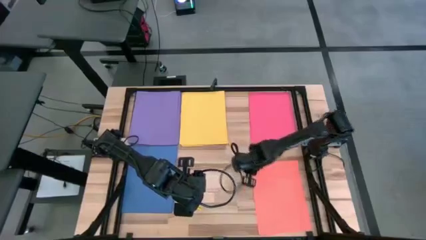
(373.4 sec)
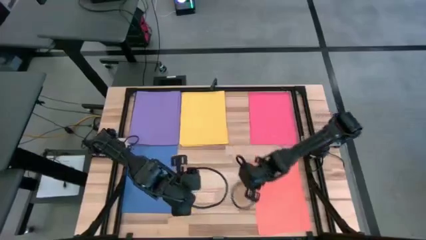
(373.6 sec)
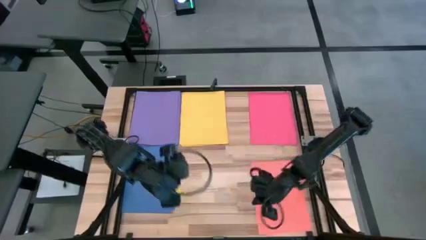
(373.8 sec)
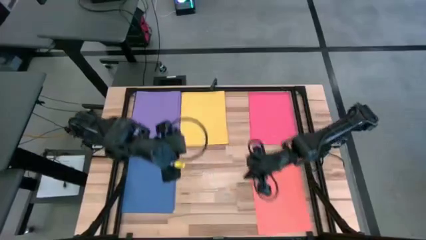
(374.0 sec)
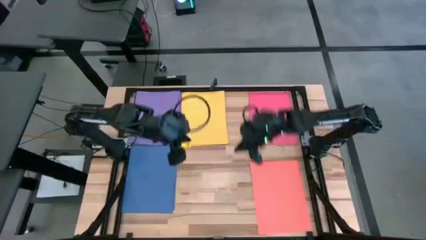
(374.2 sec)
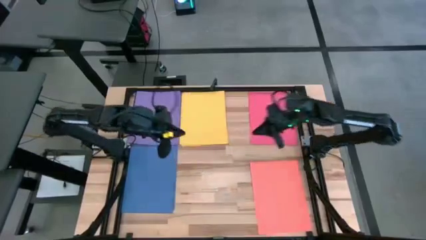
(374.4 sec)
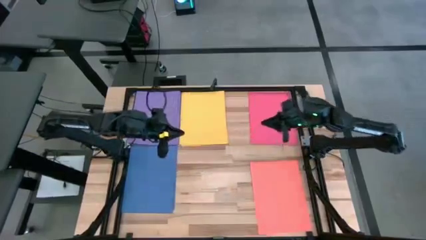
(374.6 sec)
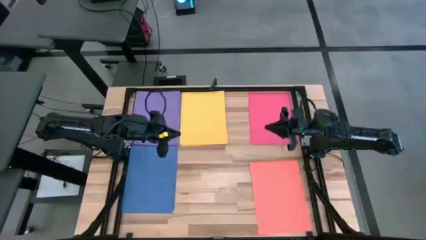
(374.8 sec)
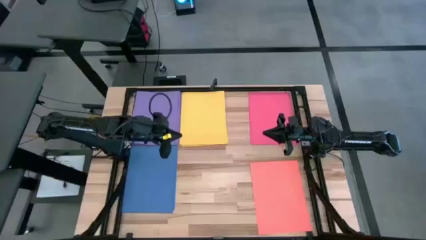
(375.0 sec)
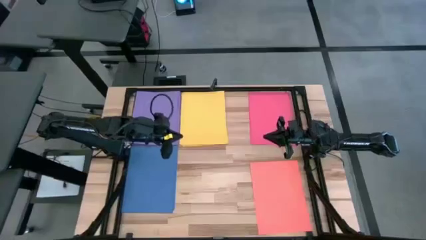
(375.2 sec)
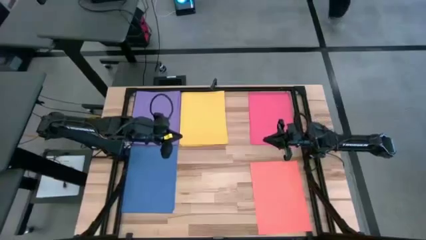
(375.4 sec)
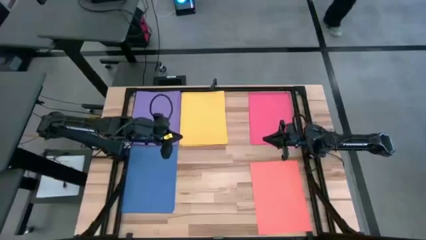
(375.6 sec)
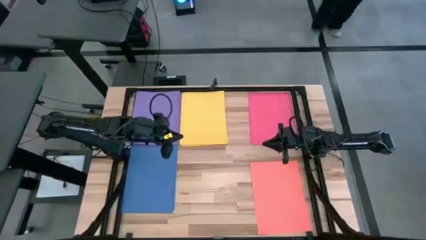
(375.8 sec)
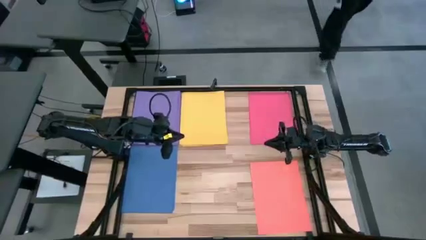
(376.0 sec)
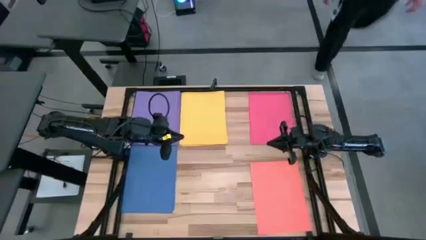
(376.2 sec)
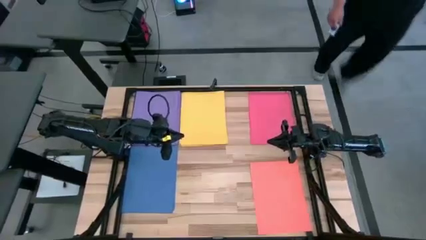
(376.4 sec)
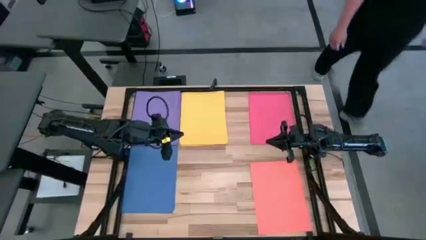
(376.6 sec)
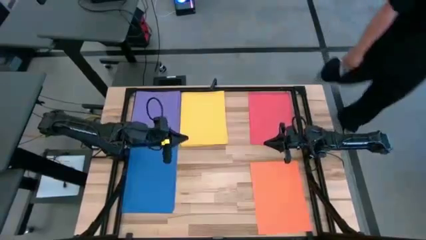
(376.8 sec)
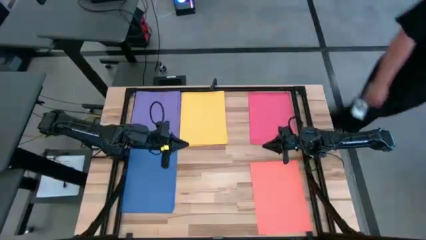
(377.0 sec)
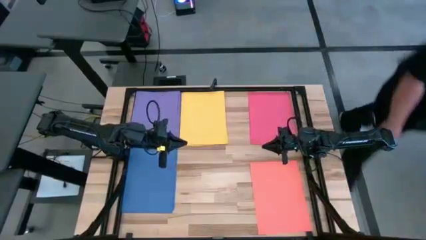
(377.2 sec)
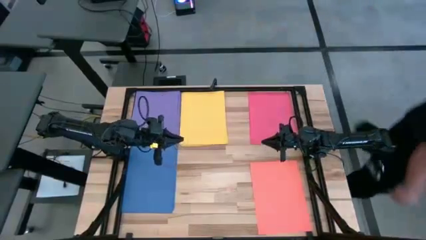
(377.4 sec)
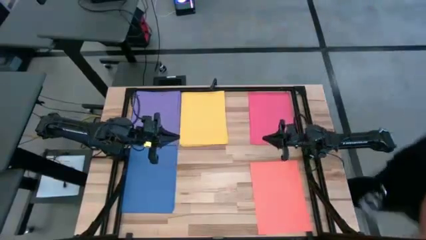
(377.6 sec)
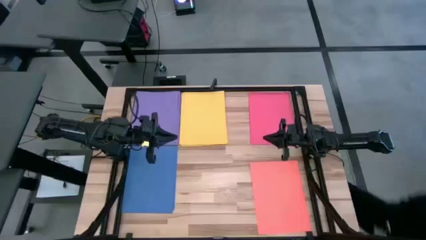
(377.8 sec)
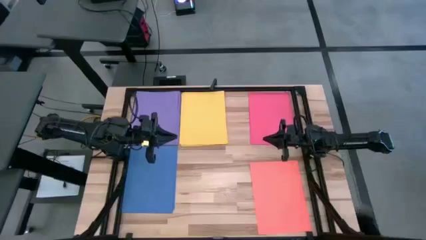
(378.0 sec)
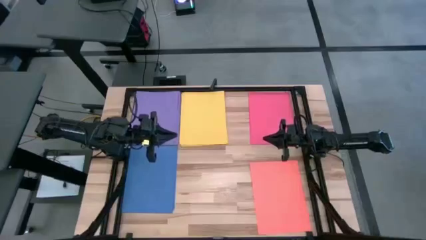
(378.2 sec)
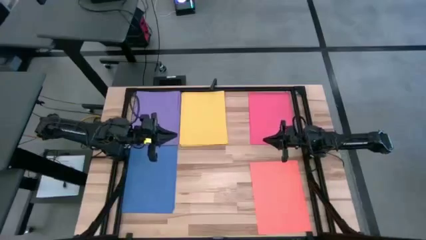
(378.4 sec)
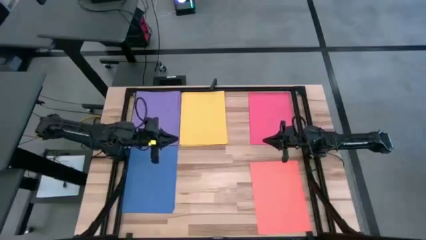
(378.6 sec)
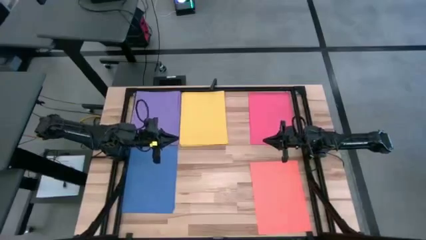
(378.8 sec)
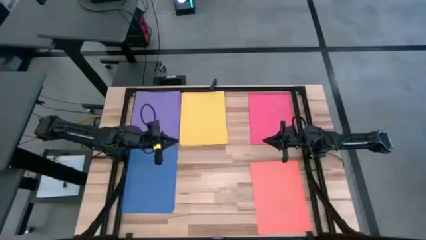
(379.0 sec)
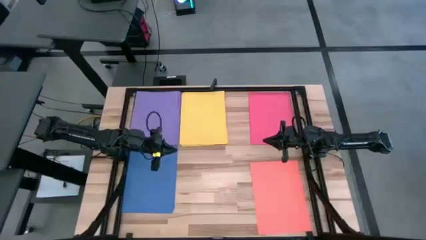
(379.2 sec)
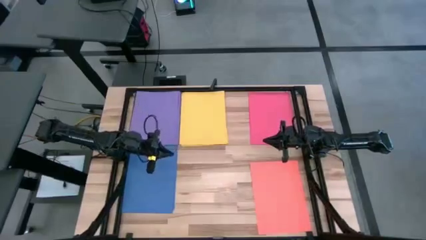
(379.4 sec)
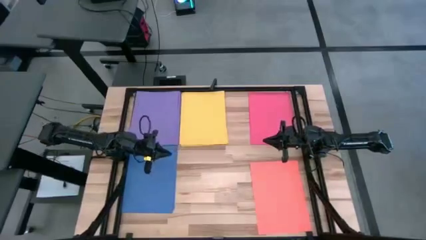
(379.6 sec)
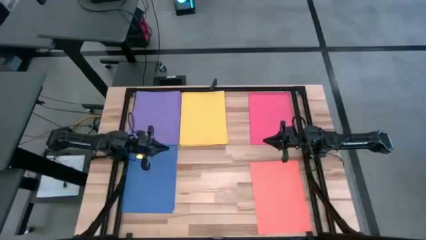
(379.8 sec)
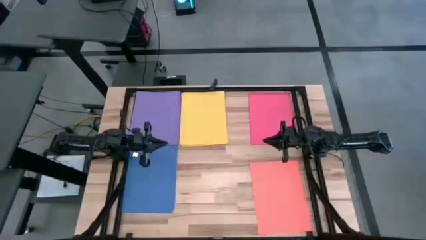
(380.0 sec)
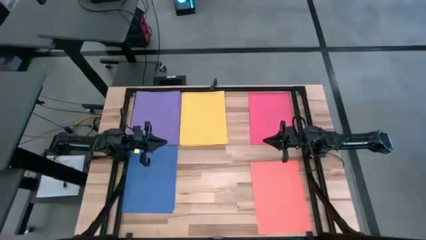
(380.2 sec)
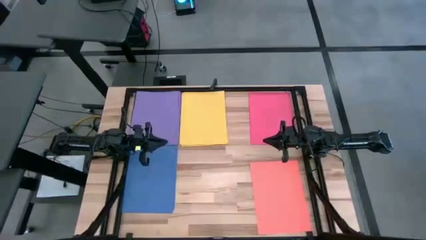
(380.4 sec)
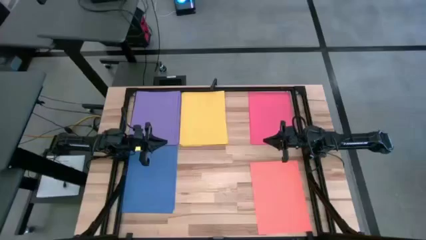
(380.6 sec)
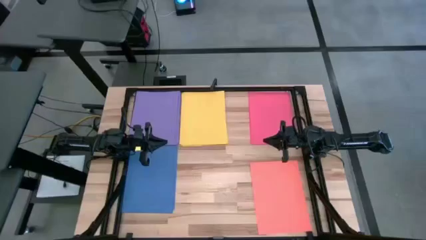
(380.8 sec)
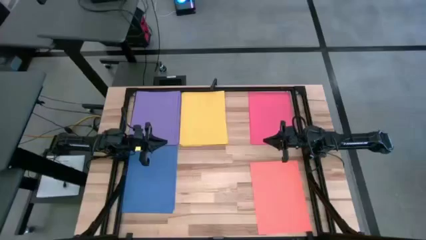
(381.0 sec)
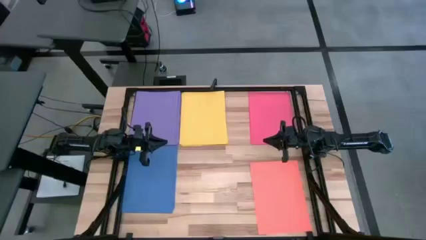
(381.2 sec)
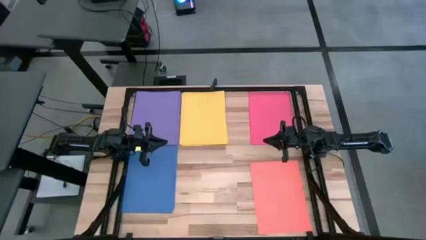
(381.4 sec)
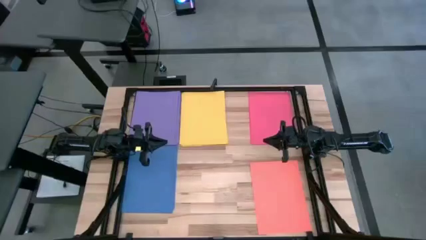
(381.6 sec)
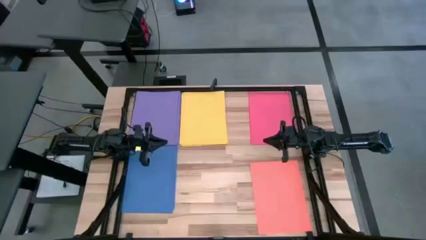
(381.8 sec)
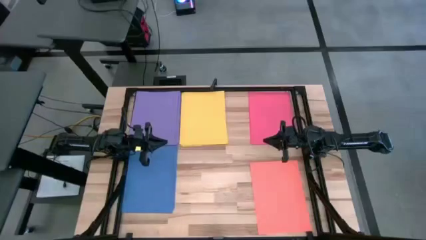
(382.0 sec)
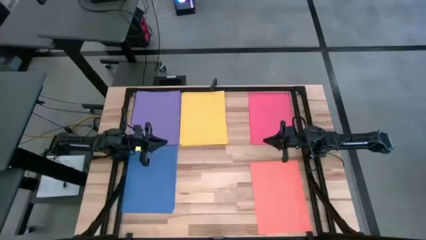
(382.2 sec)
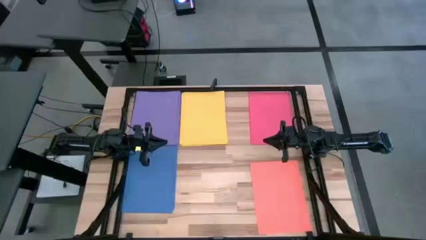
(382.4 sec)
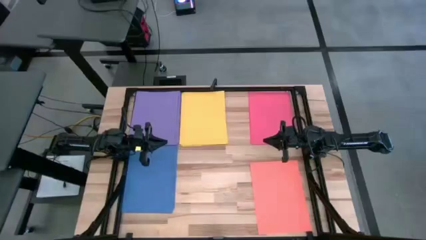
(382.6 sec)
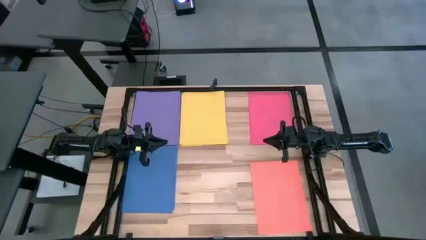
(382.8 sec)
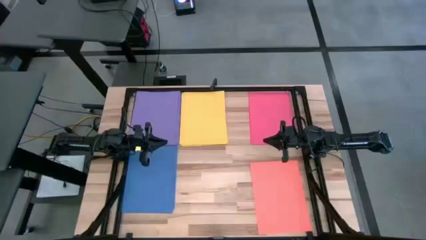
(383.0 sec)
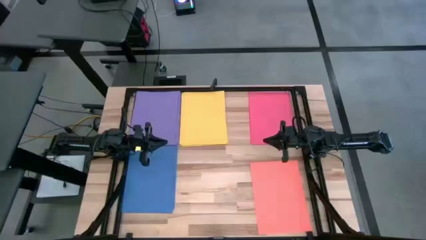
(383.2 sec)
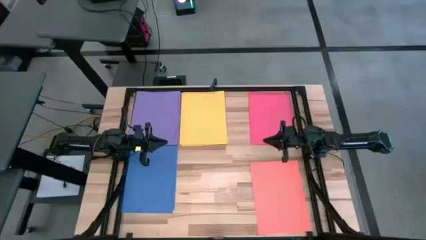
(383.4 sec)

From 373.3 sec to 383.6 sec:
Task: Organize paper
Return to Home Position

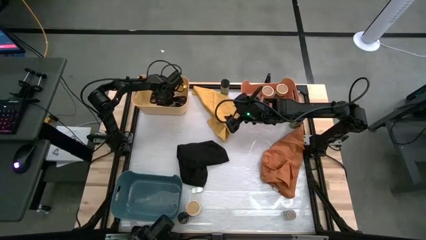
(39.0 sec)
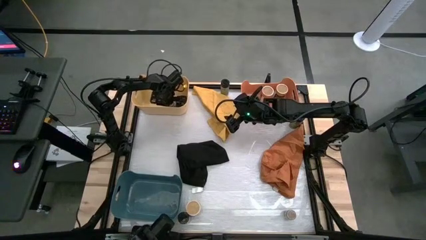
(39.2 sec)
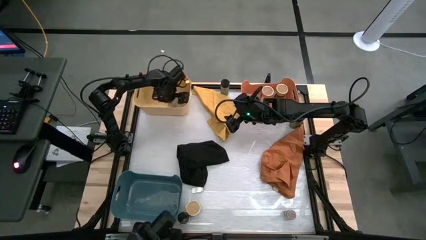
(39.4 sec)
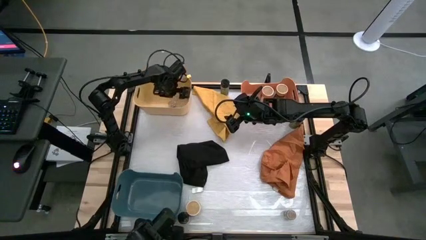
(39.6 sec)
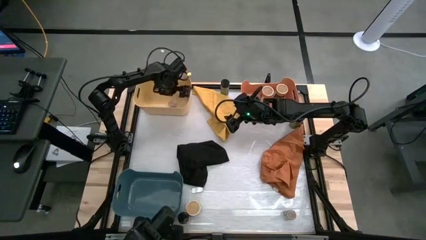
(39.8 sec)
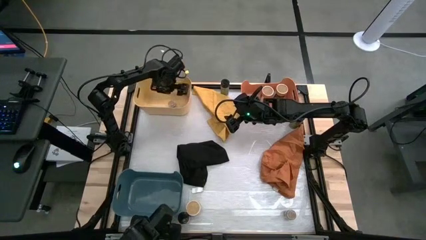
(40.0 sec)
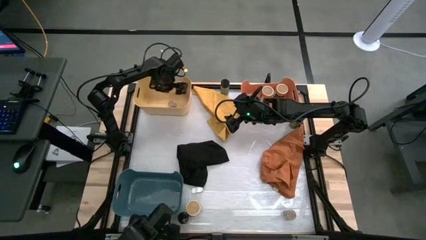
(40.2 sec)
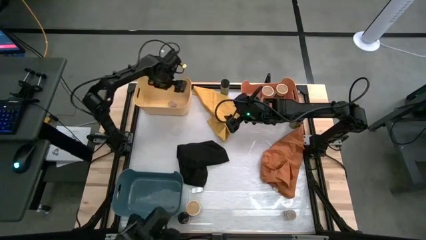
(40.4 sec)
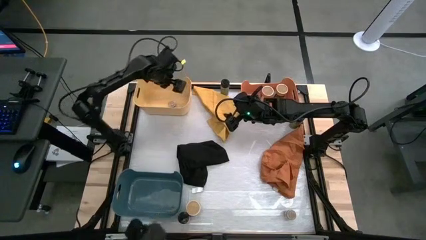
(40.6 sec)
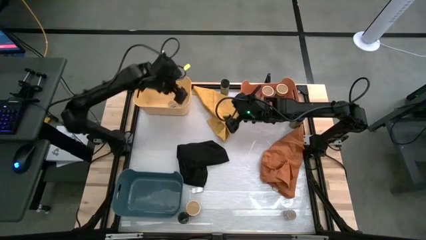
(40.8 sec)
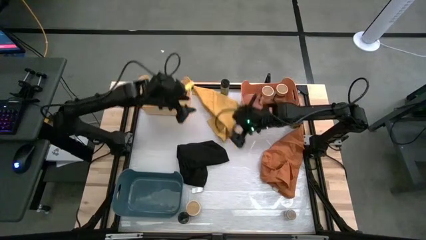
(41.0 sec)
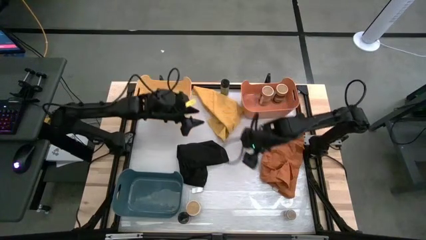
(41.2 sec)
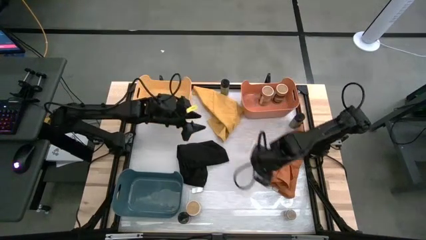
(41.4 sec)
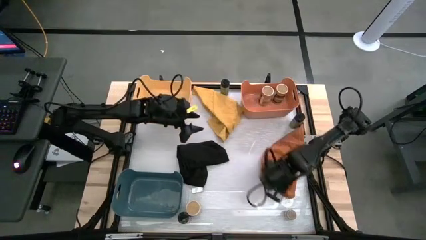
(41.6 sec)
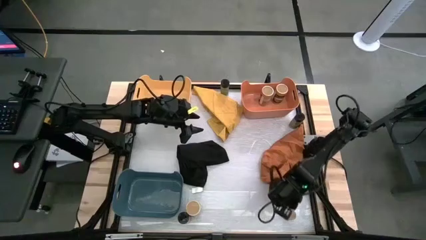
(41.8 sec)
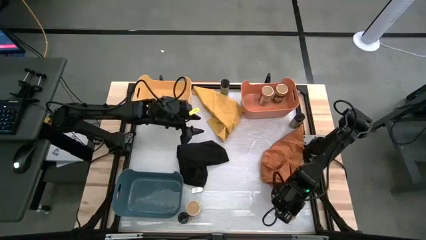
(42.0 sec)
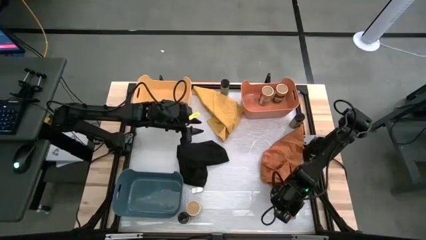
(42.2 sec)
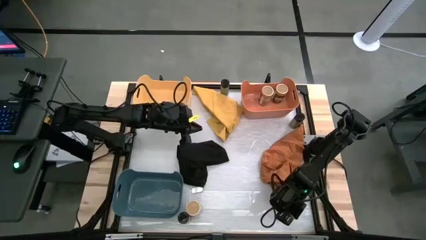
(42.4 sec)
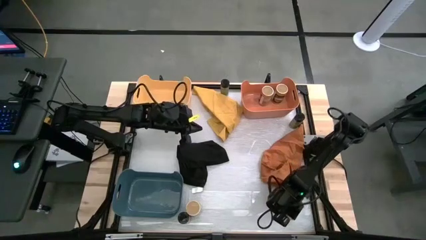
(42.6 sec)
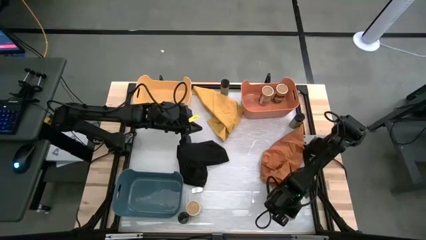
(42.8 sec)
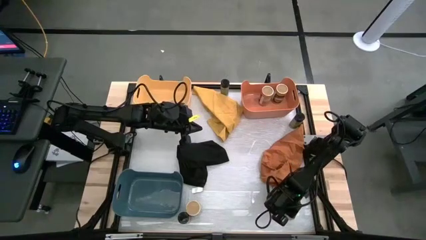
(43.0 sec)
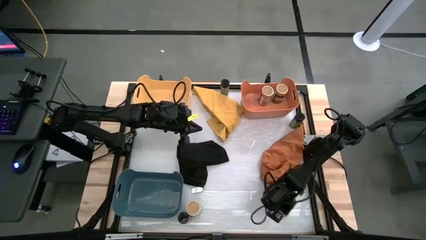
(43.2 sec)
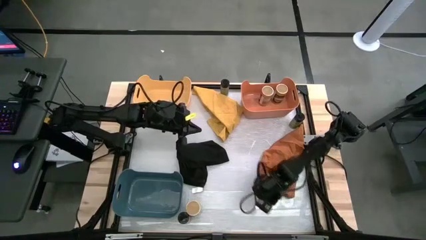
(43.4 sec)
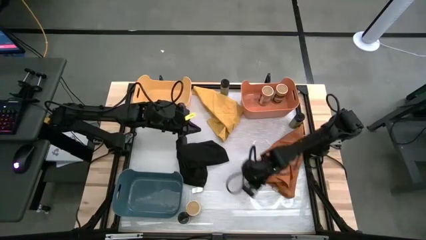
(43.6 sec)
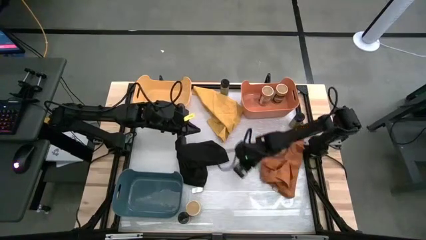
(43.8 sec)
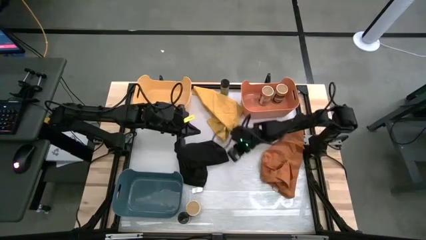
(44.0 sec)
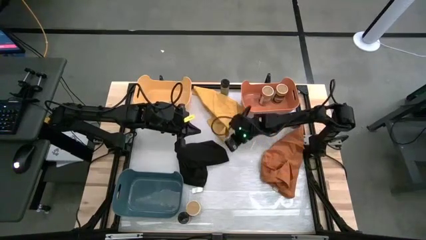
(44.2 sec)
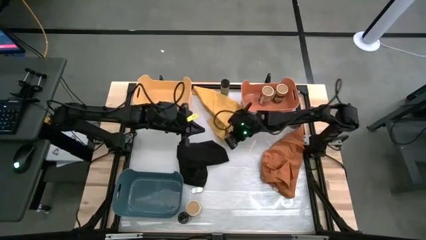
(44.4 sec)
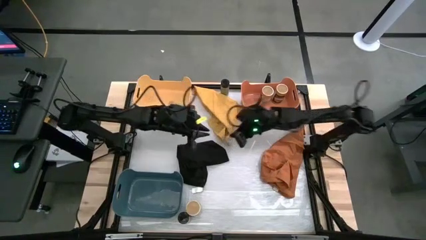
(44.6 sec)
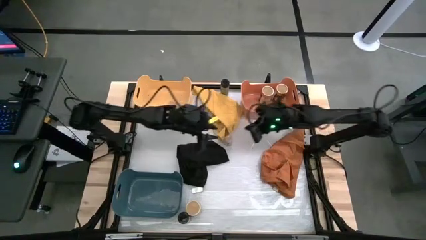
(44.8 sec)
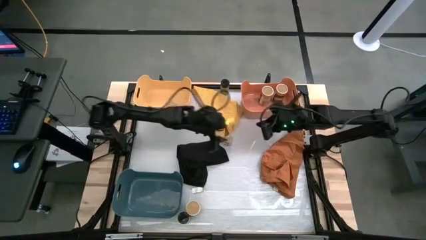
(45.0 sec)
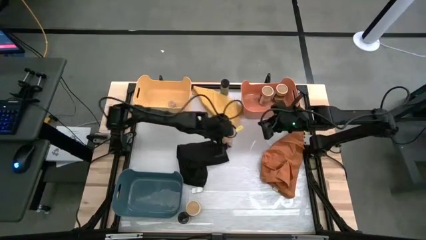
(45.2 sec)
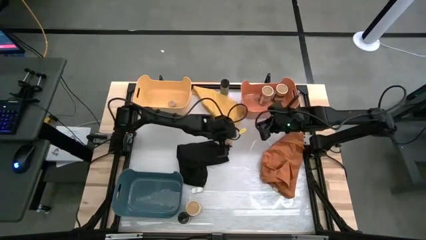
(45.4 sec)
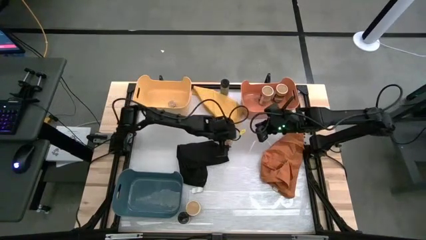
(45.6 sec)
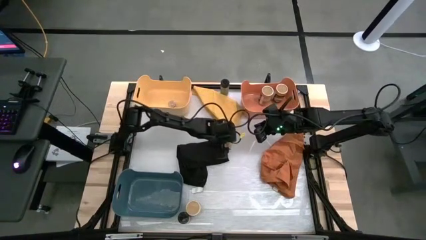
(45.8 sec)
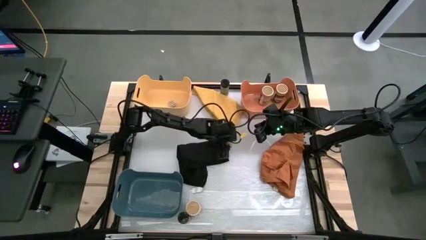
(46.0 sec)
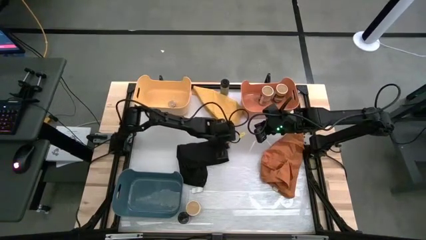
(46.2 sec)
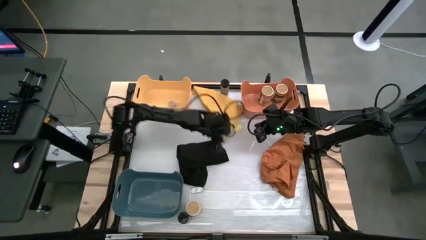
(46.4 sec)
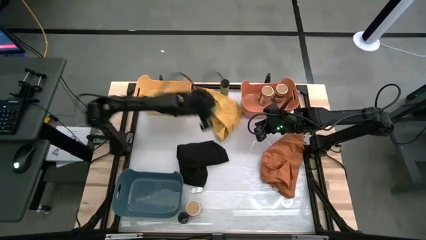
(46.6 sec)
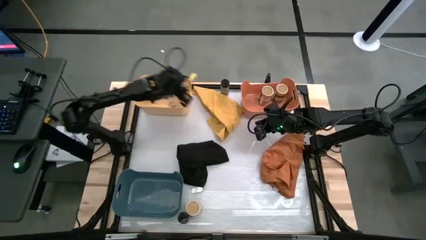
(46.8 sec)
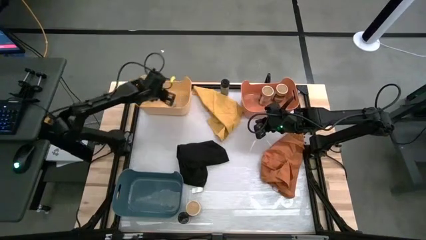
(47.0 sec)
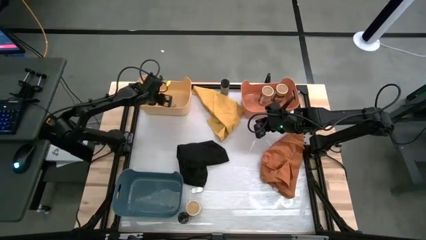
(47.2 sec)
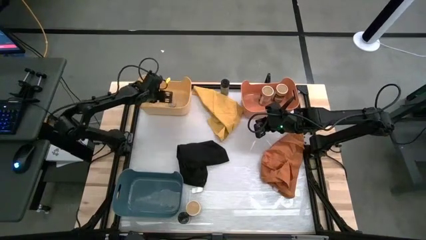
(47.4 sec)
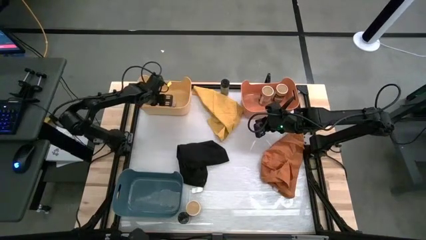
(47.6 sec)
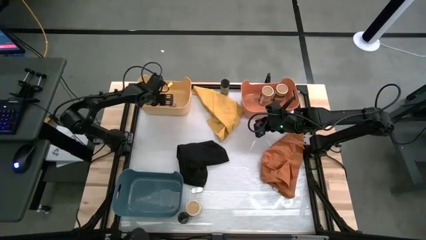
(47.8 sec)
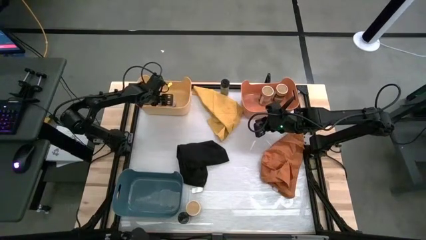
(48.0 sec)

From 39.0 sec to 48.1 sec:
Task: Sort spices by type
Put the brown seasoning bottle into the yellow bin
